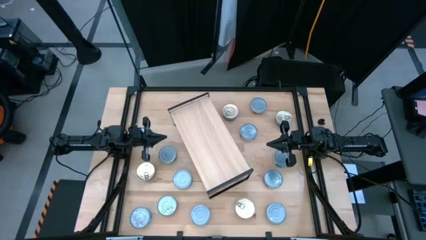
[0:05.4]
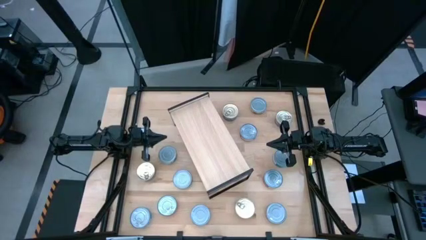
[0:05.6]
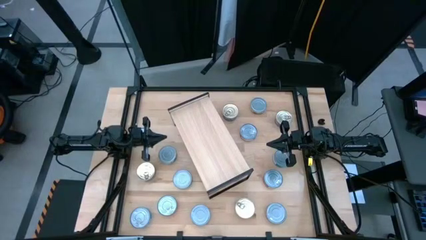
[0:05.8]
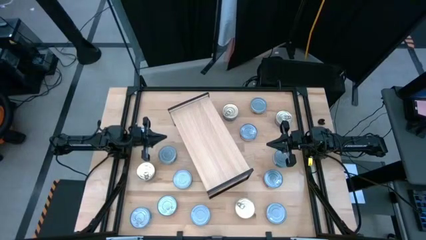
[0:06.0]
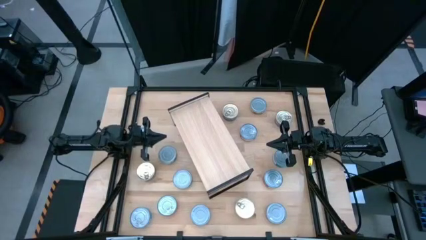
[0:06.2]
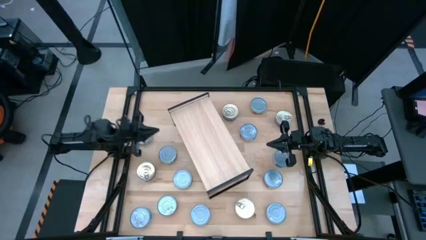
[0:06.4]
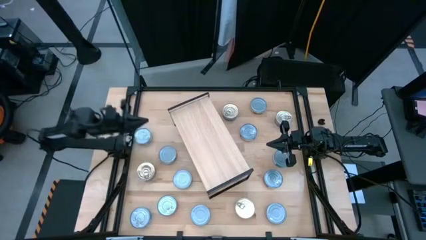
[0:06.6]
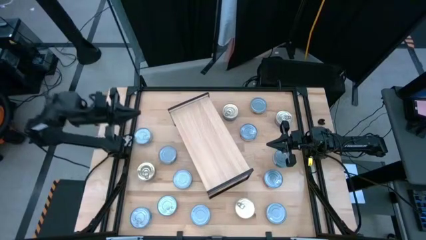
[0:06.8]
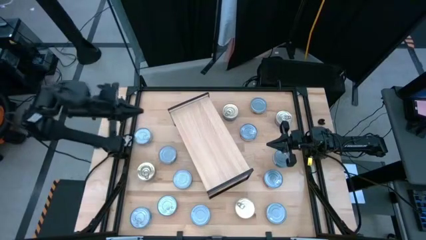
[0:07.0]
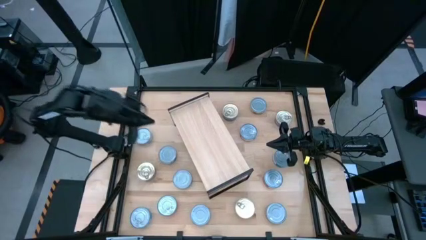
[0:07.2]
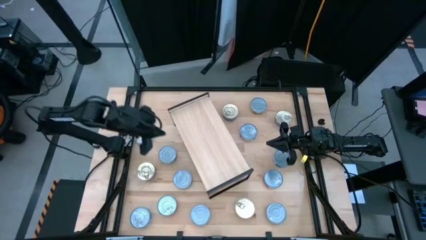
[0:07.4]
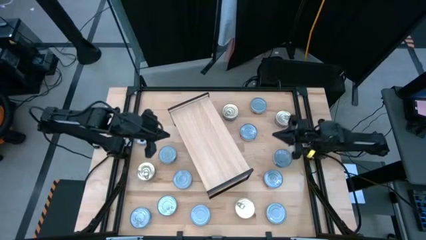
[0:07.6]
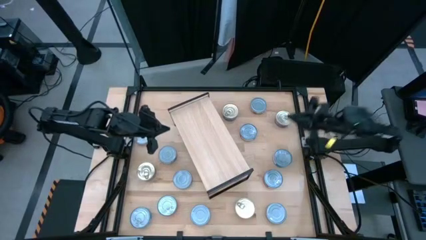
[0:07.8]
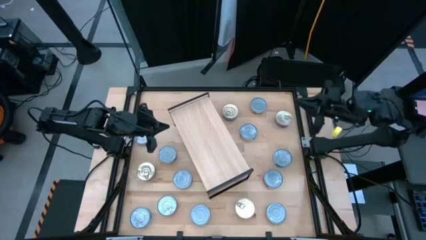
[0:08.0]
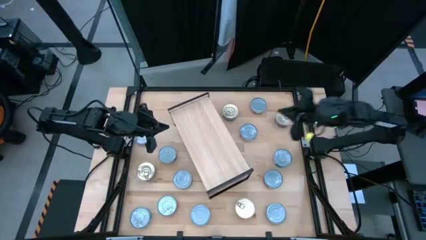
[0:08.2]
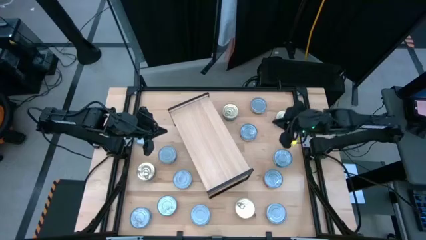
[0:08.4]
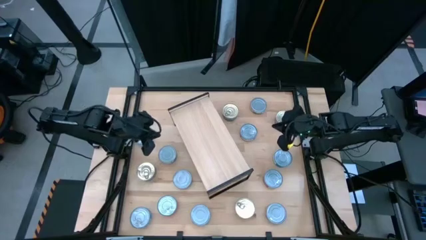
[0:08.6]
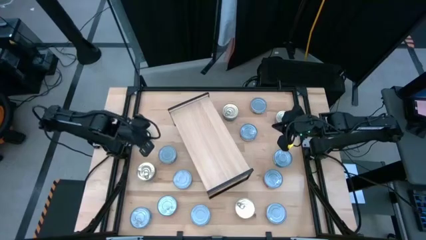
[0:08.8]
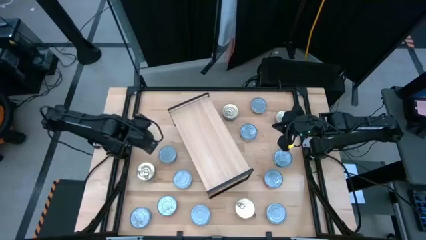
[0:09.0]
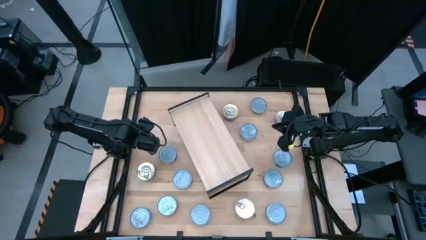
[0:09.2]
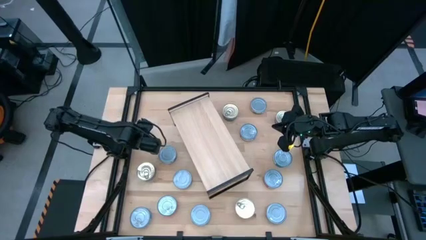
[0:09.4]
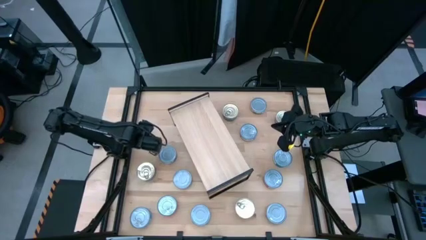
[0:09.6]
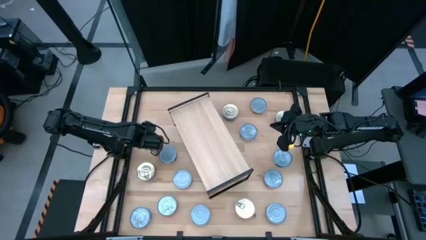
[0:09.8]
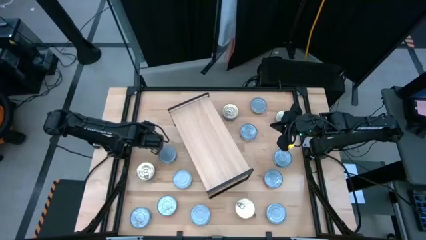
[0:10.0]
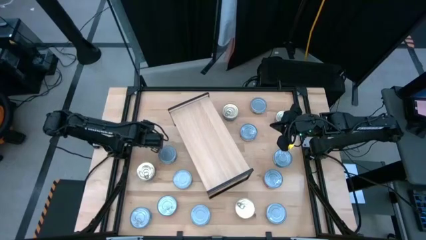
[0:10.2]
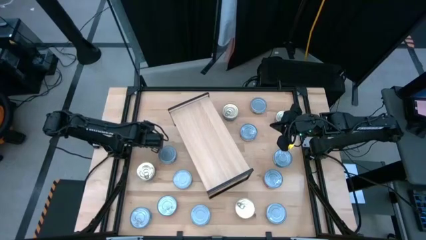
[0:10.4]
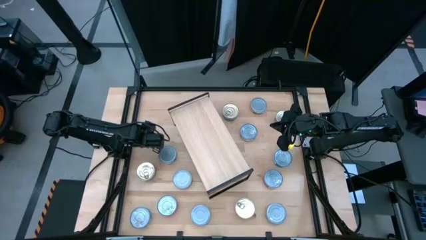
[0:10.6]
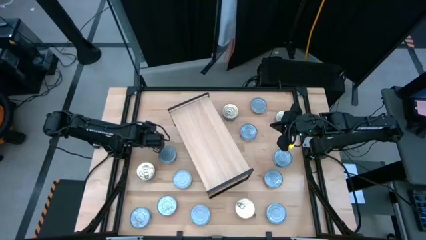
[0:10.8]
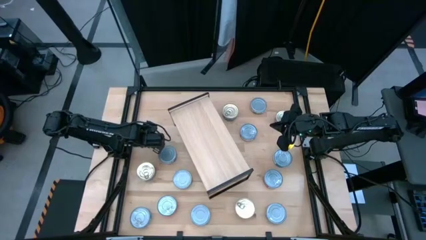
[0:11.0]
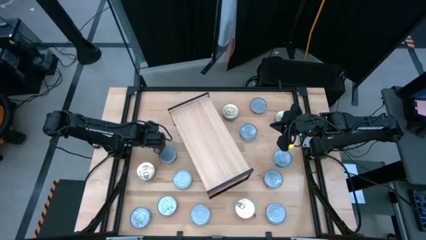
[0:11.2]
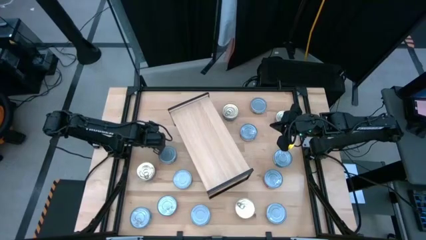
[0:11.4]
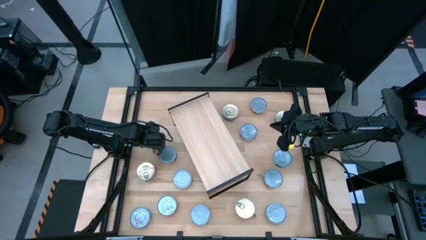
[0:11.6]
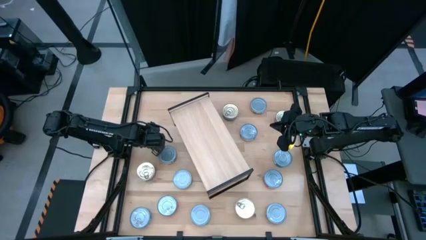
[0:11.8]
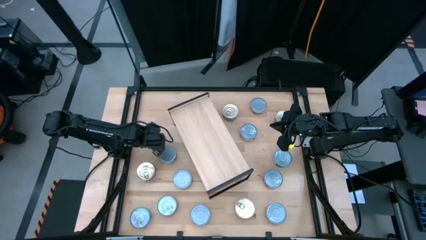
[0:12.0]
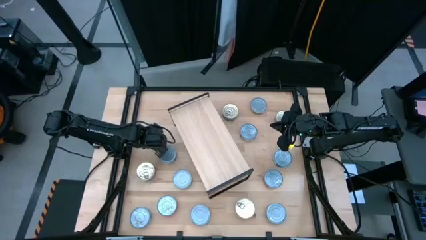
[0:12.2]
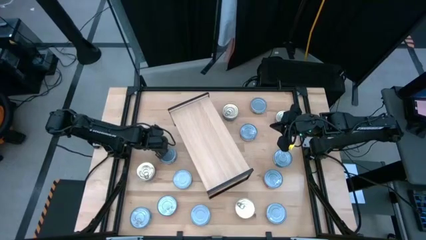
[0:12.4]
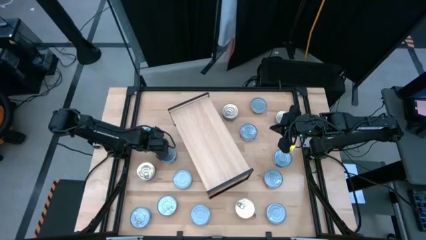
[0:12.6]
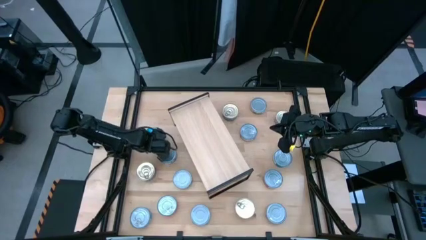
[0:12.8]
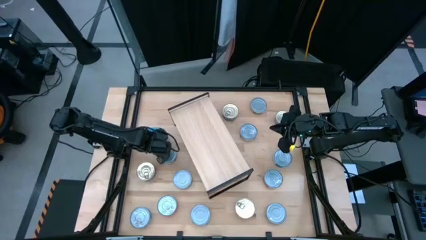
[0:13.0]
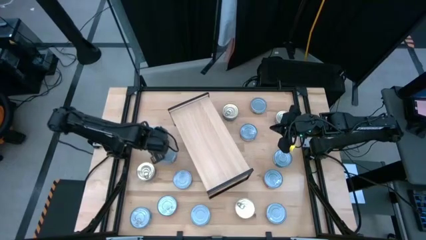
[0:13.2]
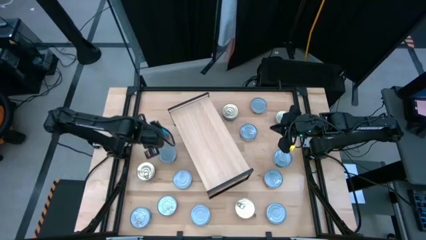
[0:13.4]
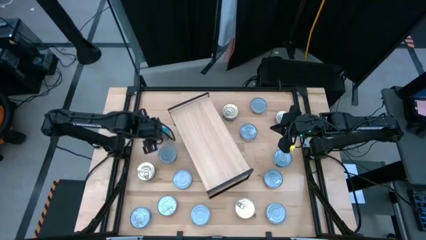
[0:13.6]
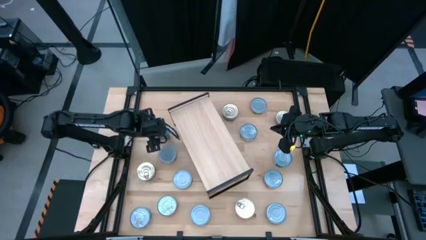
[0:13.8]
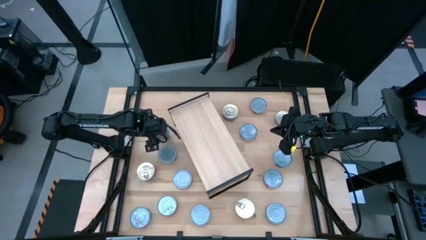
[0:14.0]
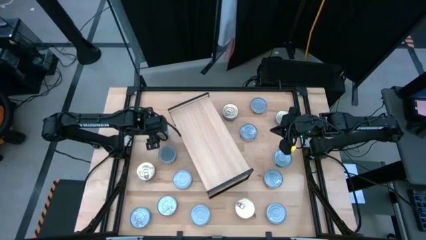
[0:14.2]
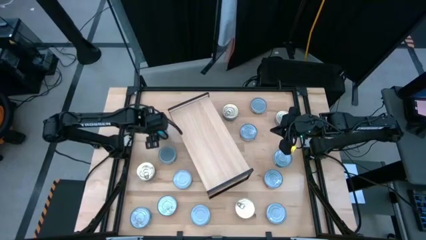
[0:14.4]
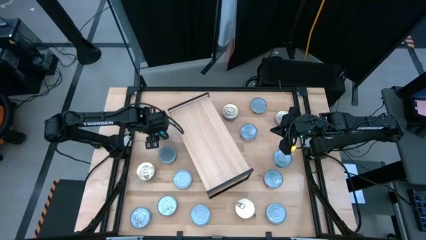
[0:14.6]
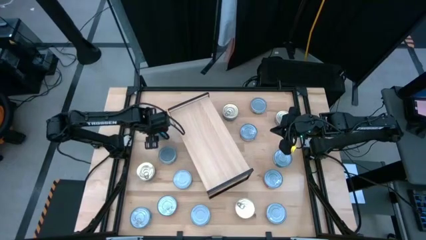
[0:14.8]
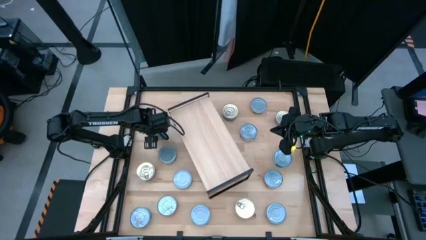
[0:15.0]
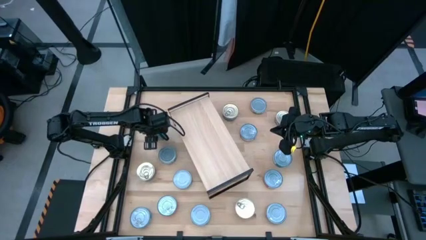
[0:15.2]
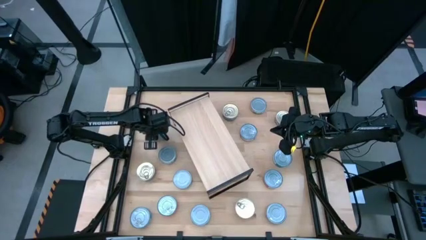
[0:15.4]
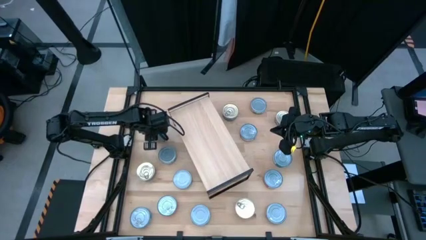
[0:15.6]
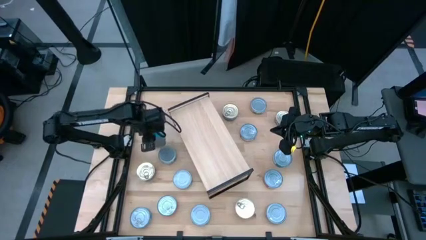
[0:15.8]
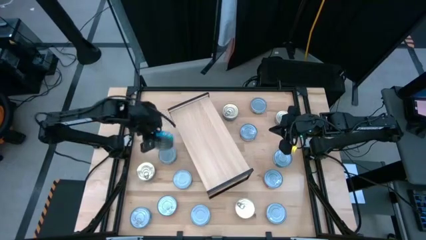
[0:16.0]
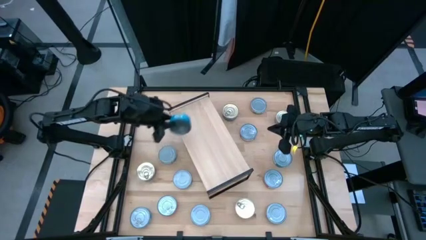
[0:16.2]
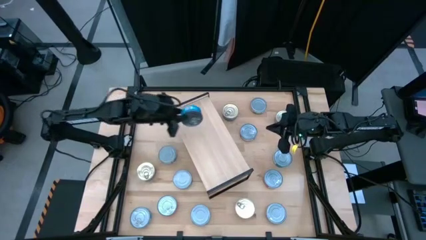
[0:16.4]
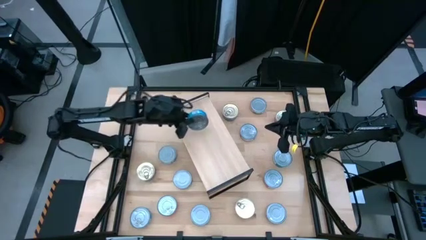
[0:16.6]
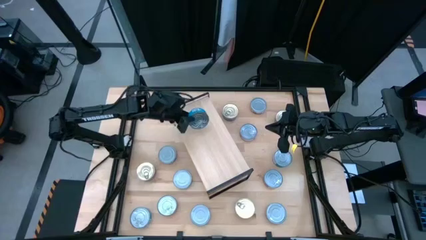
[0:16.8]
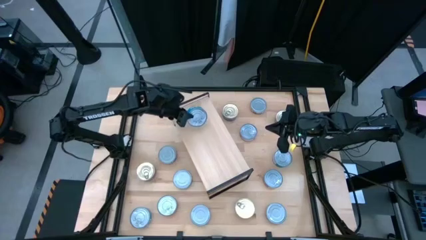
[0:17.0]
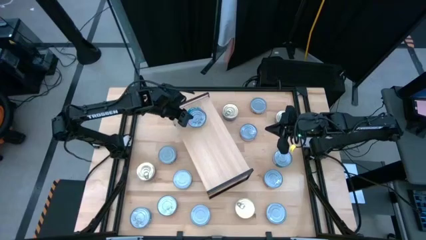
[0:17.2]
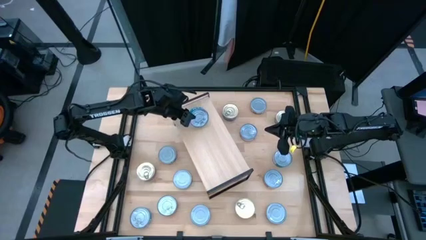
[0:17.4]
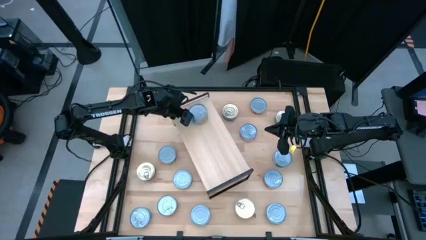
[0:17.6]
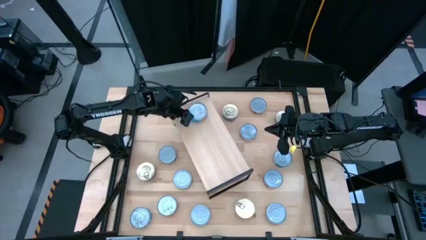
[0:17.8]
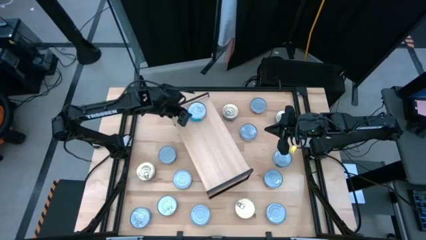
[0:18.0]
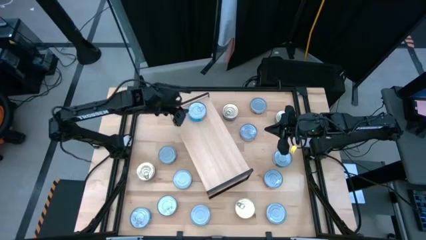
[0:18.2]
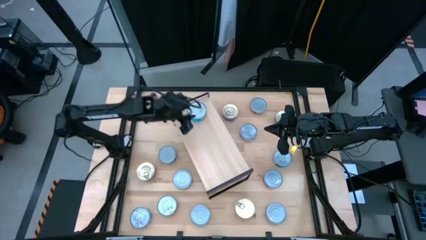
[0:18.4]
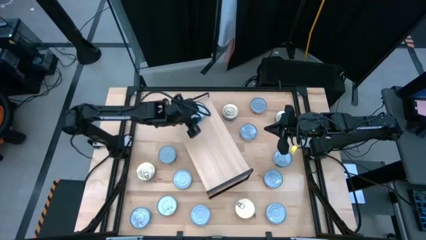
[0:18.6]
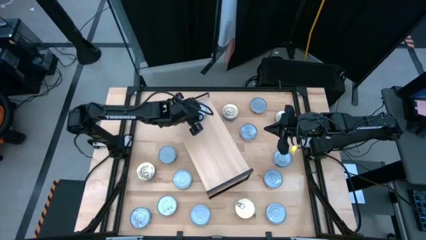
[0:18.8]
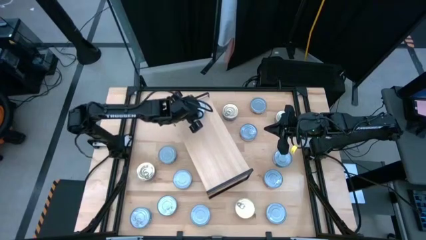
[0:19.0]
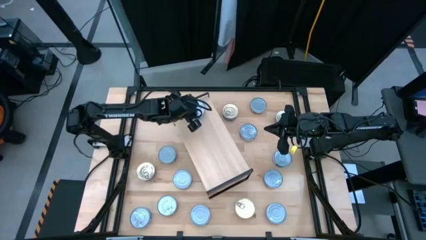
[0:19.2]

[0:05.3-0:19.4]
Task: Stack canned seafood by type on shelf
Put the yellow-blue tuna can on the shelf
